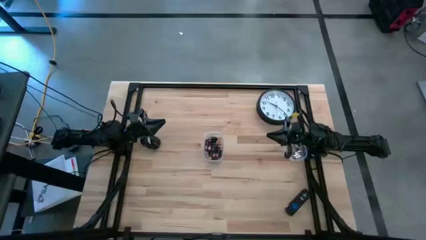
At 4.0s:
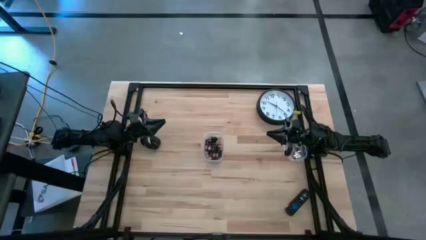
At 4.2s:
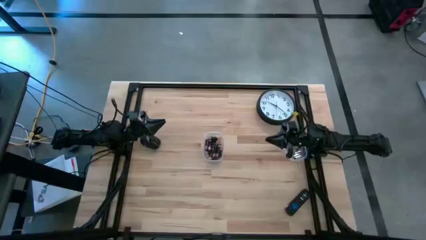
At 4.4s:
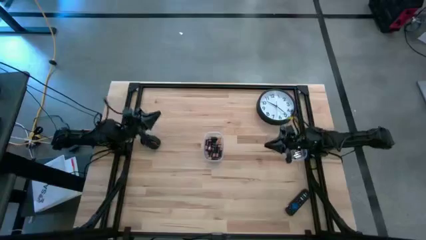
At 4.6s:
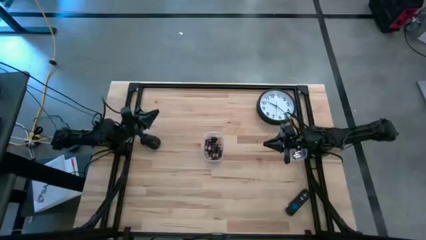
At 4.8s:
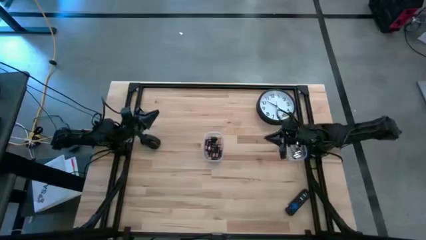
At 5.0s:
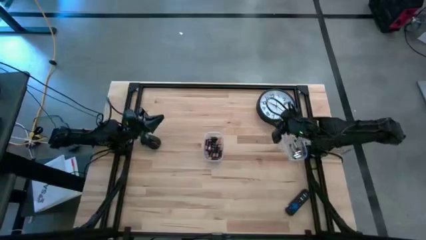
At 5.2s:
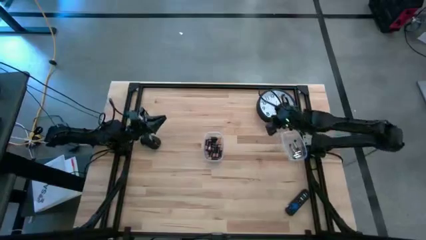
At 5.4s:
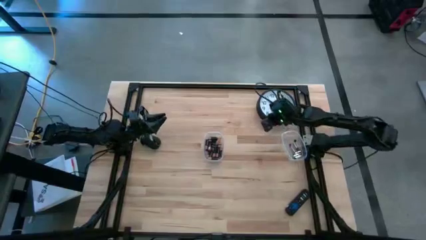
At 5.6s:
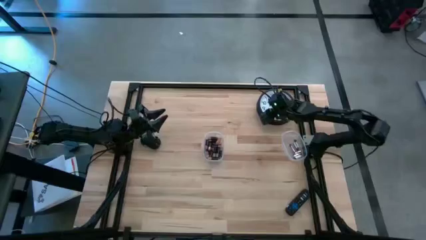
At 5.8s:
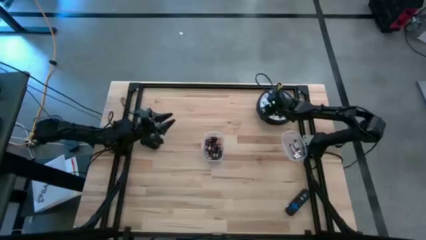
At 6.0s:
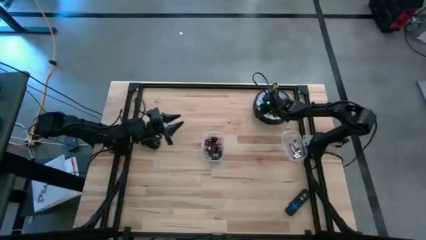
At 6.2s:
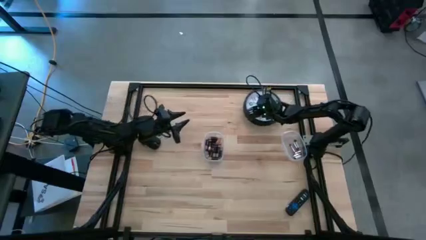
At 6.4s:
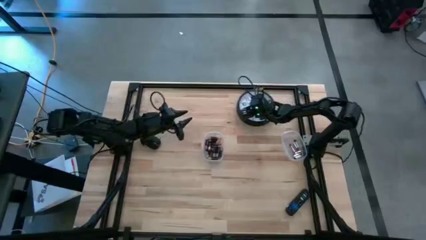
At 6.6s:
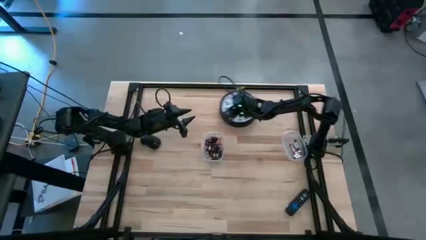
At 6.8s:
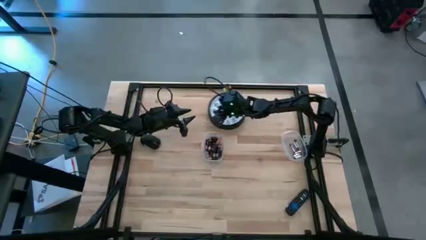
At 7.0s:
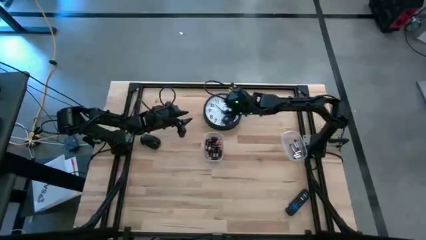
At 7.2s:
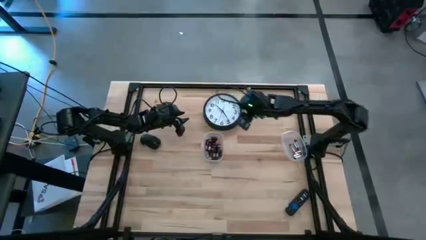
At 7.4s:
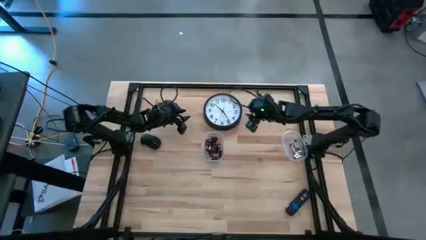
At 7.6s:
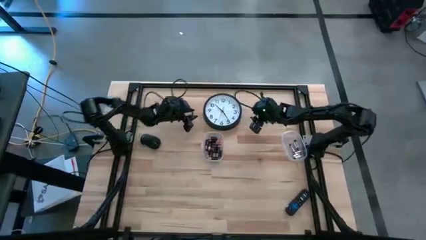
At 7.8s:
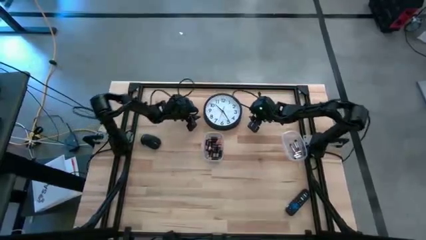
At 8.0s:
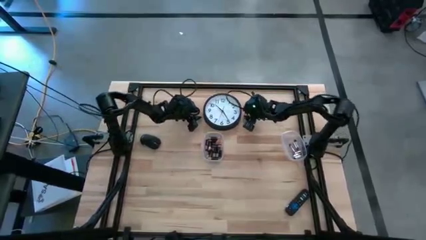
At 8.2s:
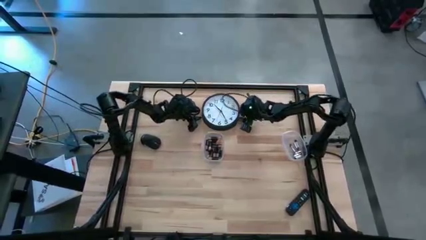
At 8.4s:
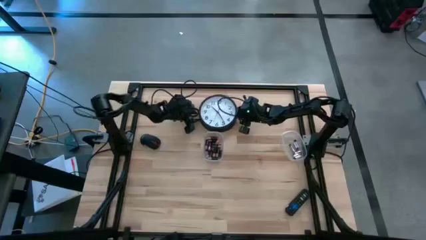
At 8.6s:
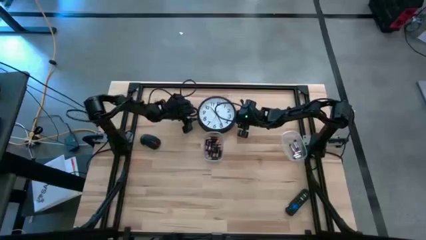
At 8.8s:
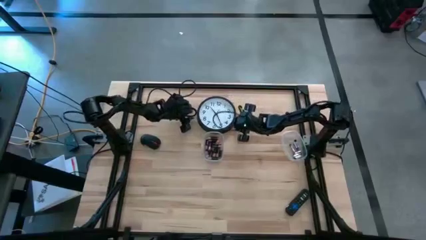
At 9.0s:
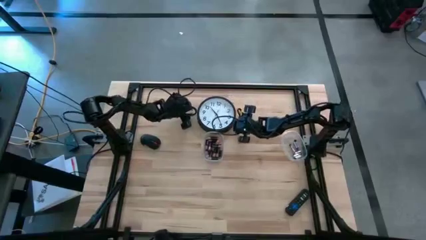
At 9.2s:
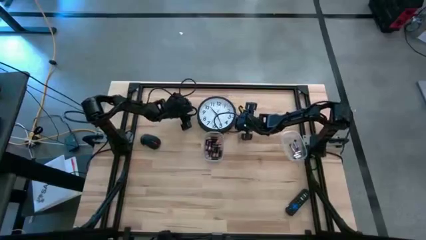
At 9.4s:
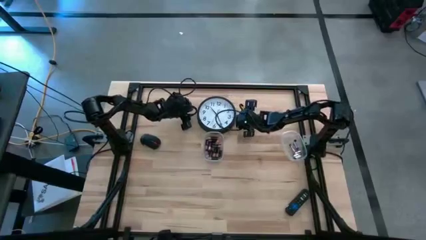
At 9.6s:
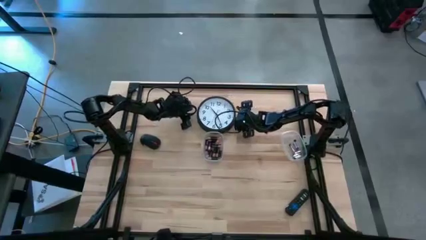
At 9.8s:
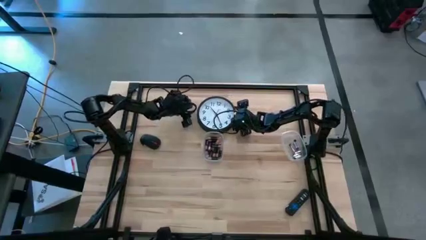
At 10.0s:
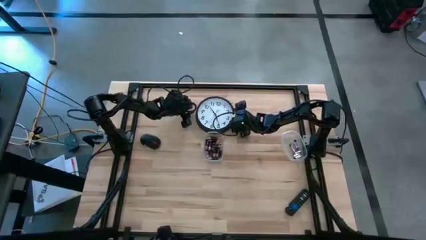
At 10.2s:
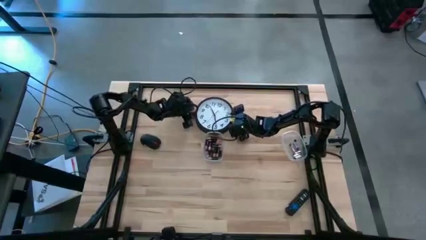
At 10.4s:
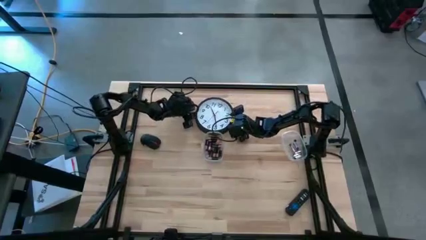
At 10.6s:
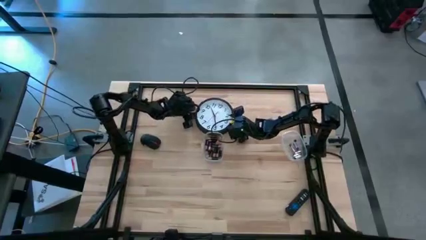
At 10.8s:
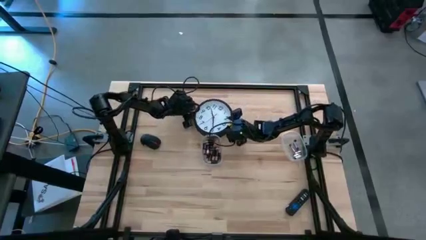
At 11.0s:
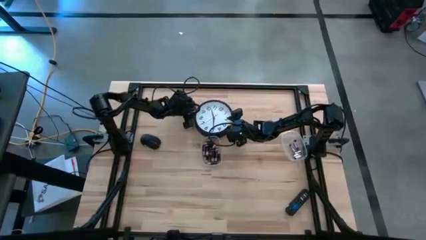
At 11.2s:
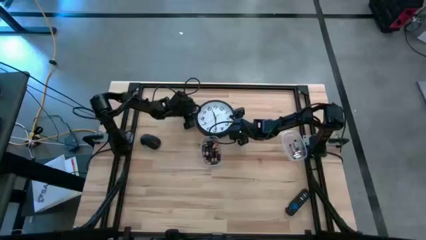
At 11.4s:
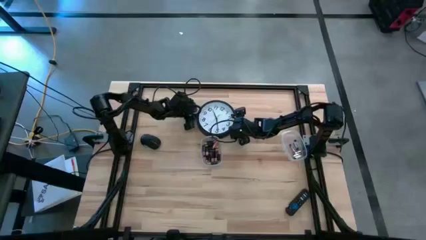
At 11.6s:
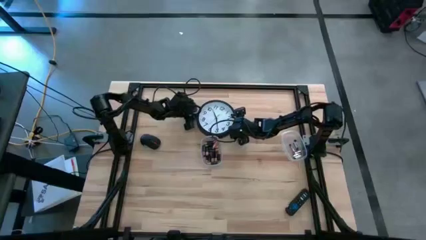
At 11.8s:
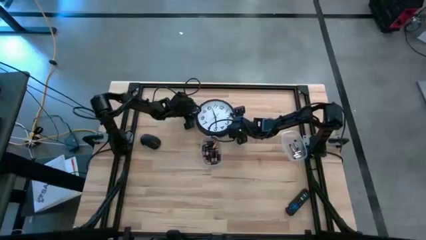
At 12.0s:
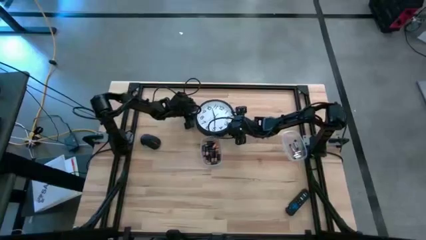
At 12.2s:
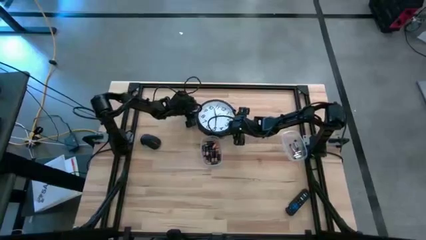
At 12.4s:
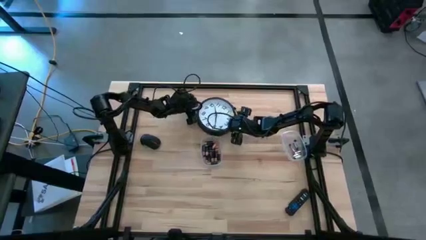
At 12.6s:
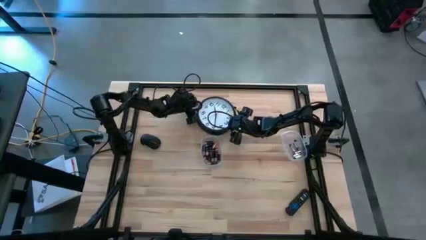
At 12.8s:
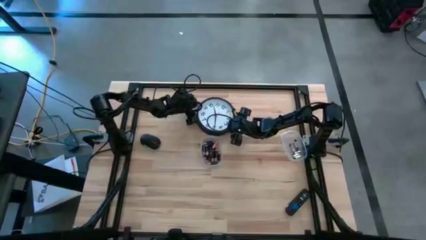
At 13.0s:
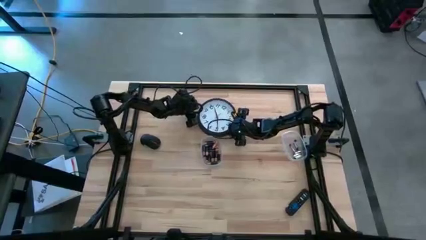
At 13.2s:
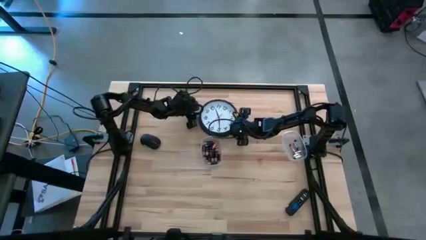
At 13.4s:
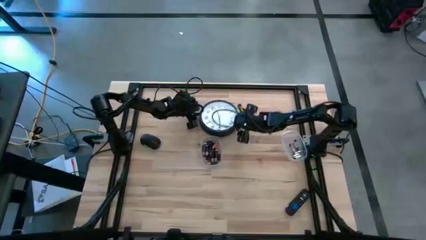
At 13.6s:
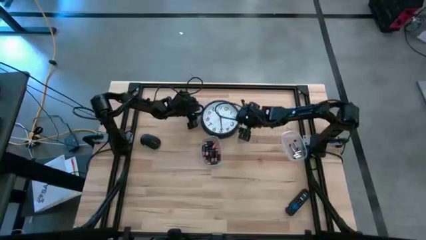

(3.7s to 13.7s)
Task: Insert battery
Move the wall clock to the top of the table

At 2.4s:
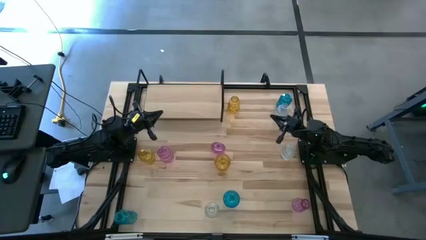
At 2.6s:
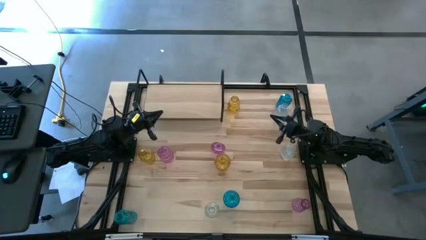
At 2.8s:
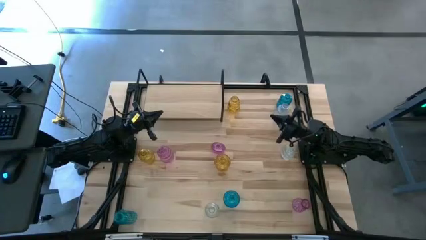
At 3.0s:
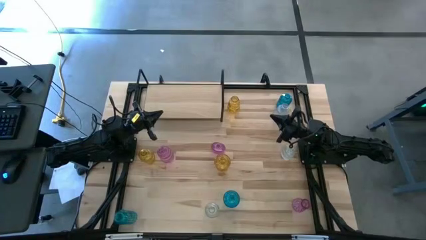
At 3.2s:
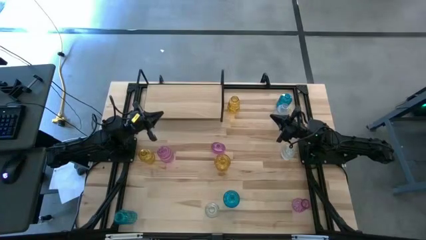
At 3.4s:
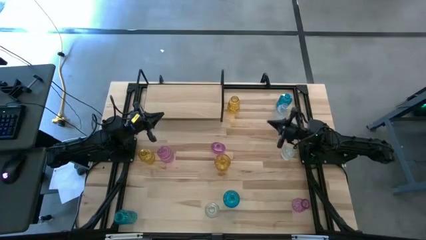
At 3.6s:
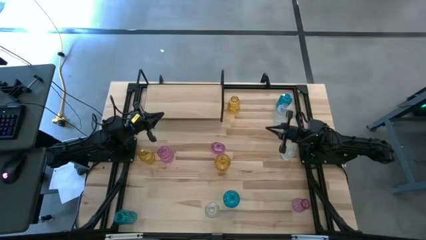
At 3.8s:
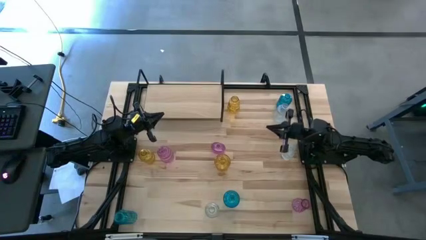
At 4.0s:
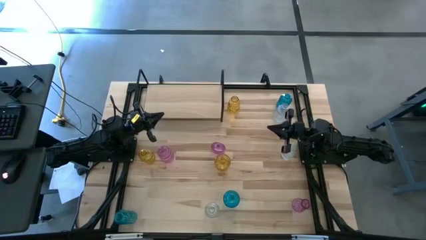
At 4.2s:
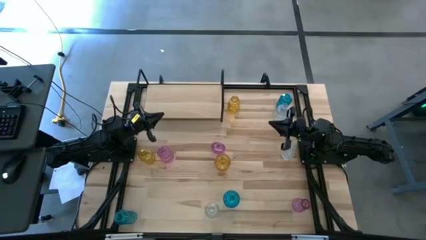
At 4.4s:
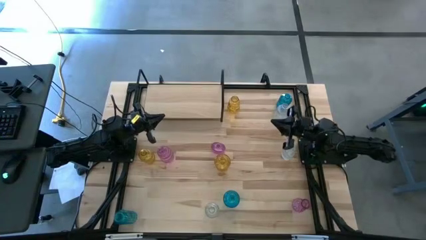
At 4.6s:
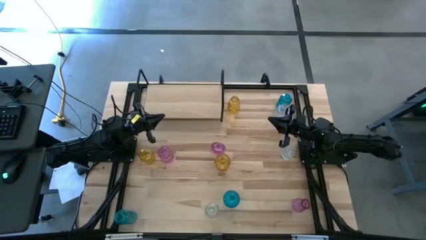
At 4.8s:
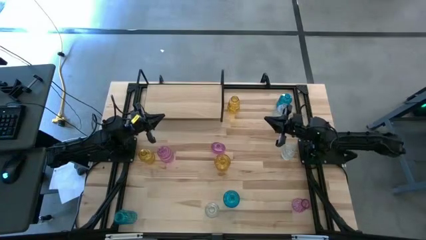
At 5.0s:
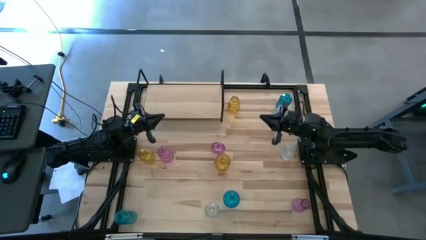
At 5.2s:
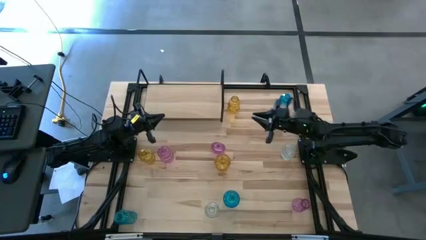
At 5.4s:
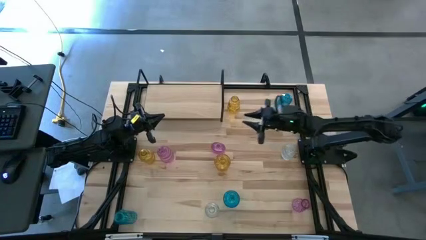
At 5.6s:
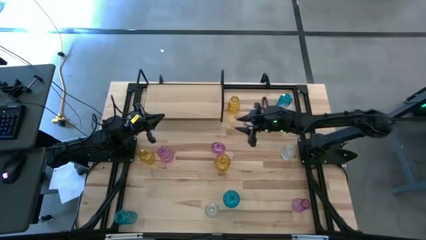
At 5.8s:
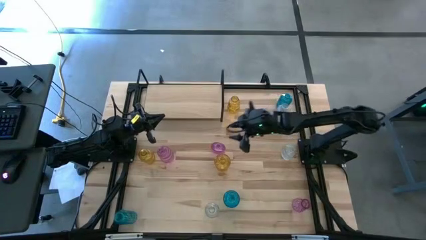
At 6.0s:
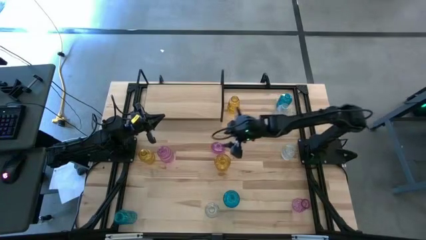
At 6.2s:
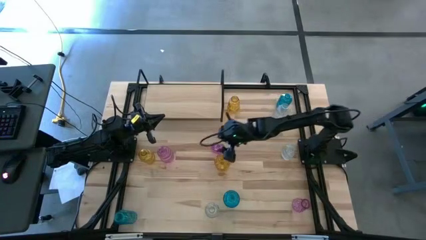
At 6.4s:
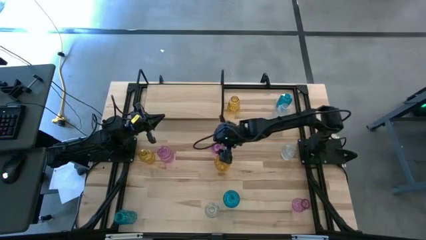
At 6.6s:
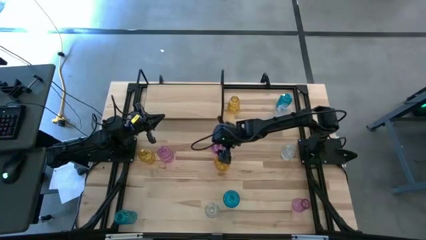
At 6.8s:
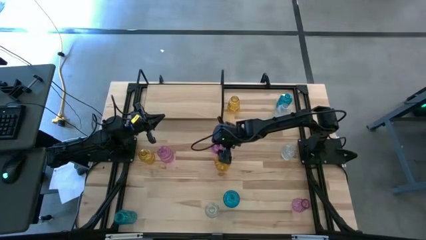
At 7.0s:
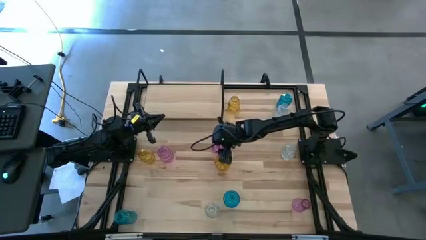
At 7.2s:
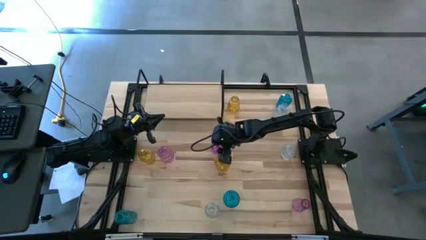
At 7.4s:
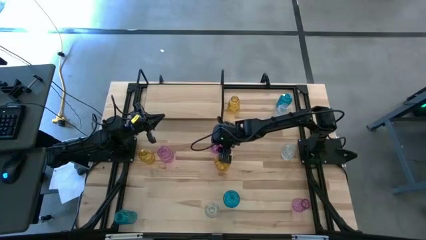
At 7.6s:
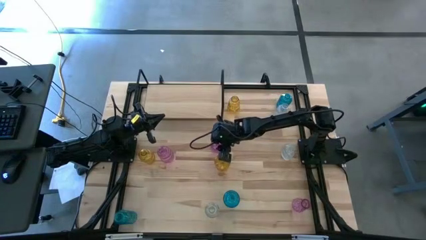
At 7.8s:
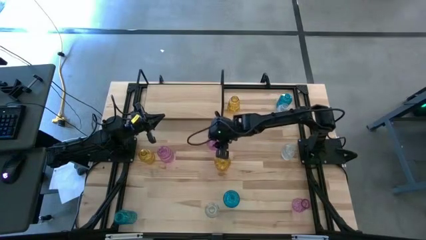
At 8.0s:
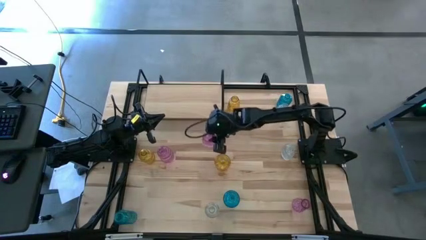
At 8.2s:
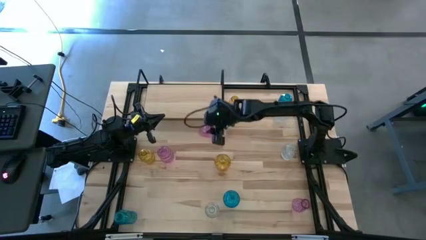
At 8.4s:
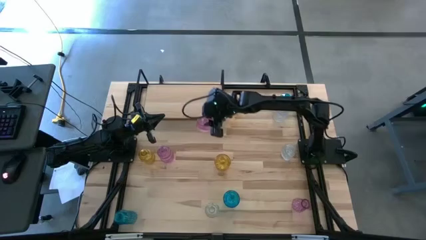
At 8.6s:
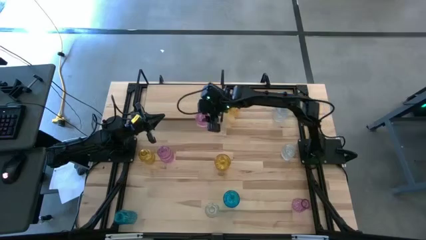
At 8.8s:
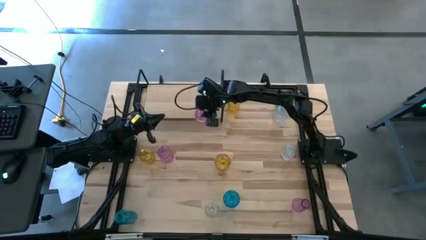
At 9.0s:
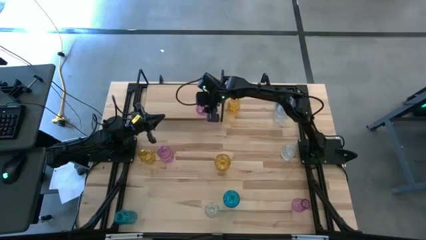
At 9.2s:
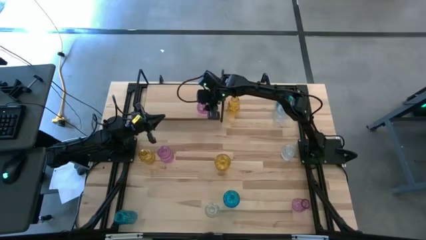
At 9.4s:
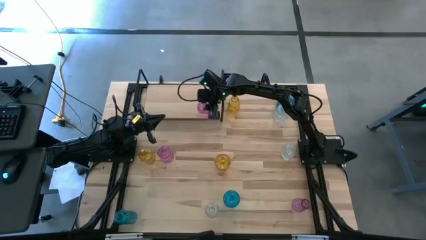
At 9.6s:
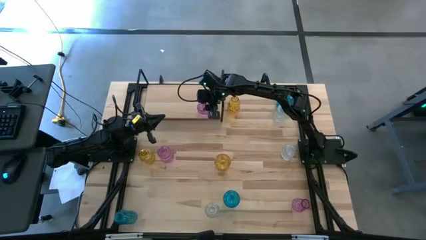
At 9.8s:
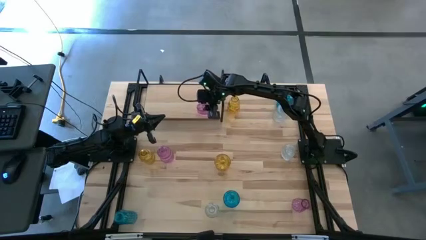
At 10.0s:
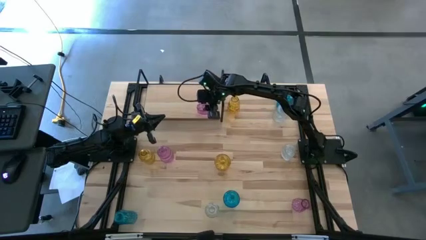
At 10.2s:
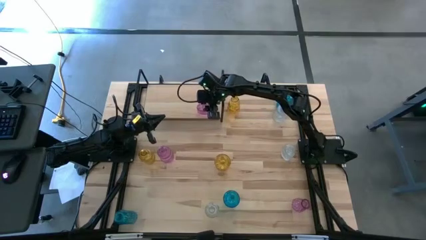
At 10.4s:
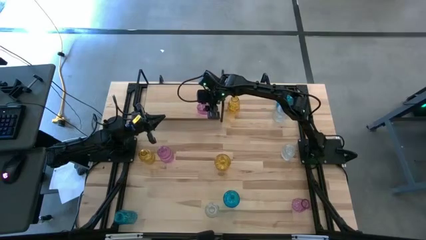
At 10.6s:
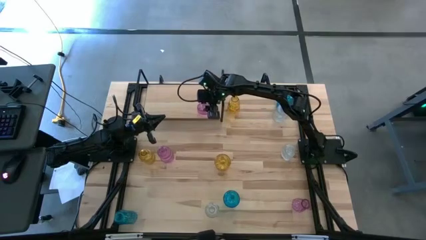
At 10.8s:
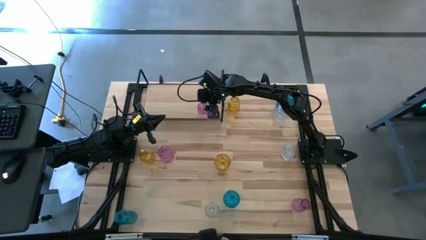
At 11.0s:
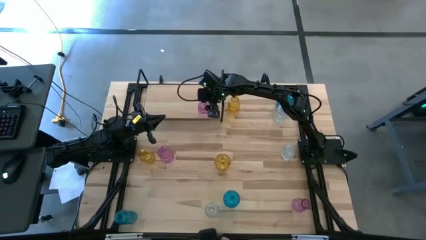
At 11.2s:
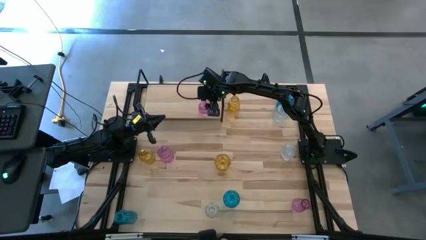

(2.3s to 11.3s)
Task: sort vases onto shelf
Put the middle pink vase on the shelf
